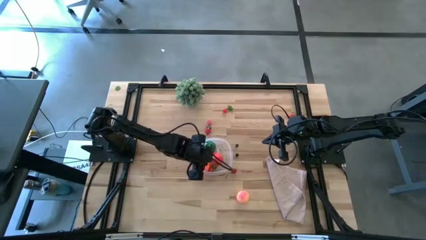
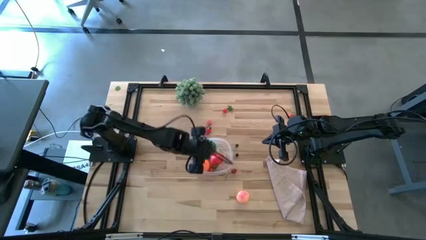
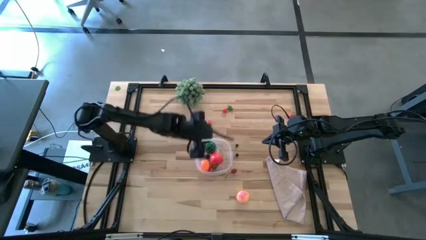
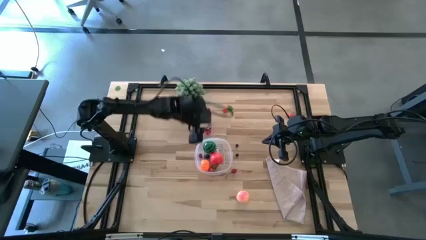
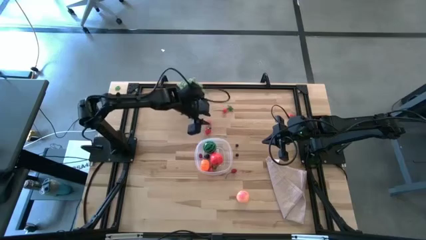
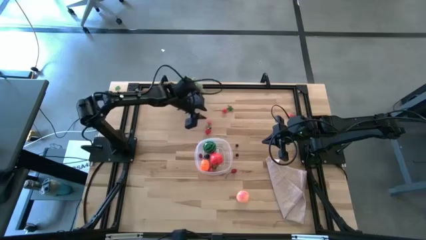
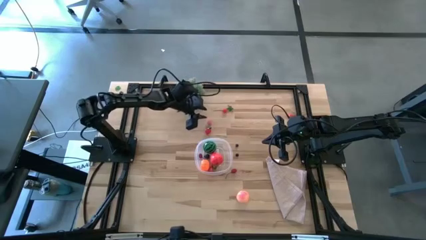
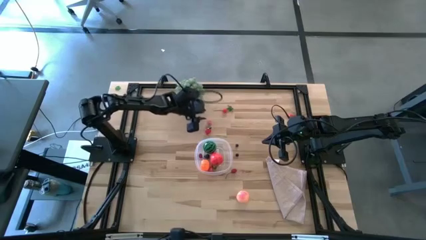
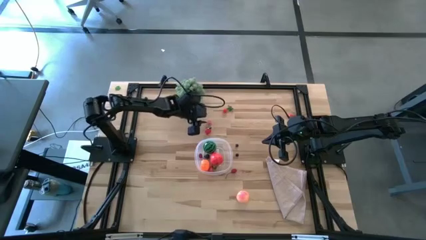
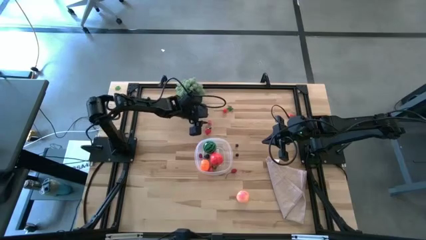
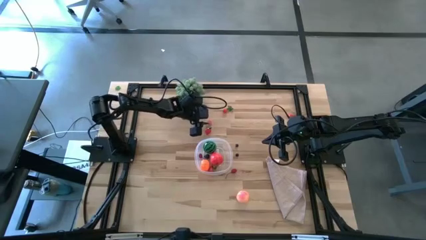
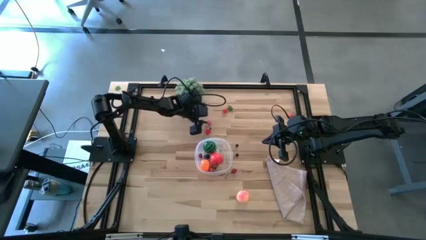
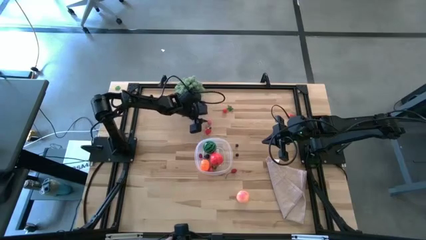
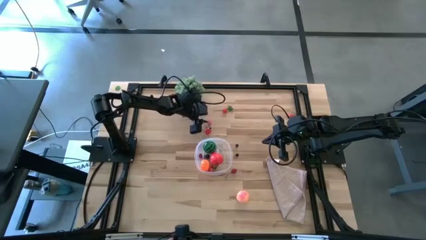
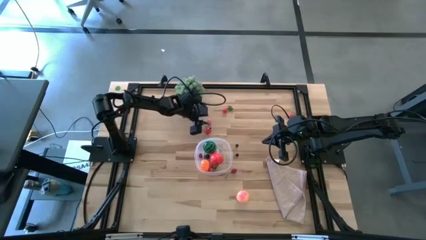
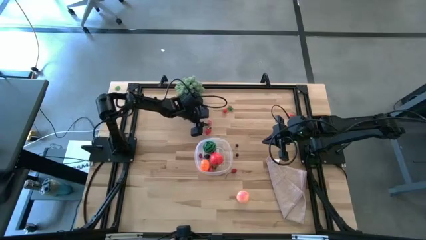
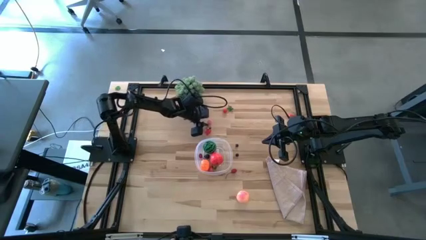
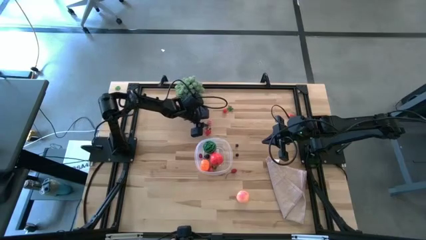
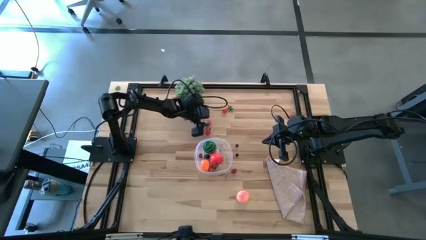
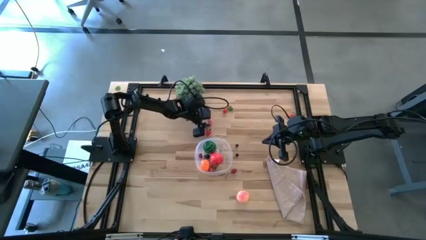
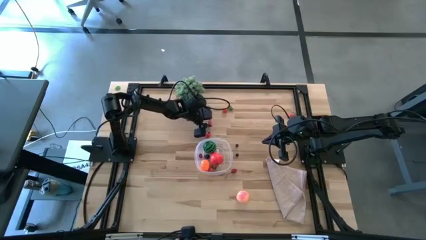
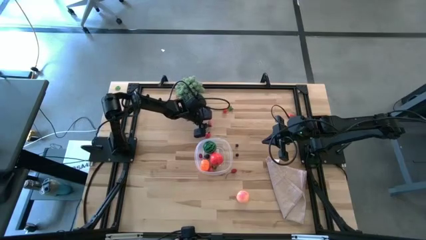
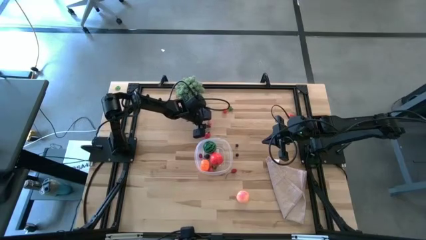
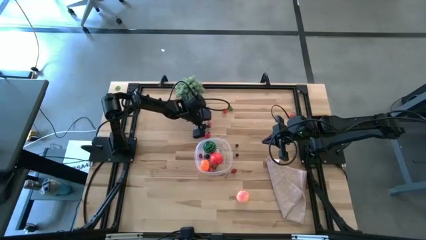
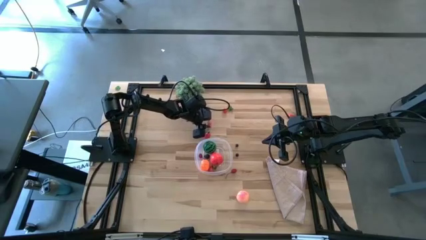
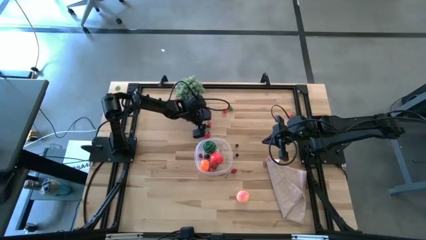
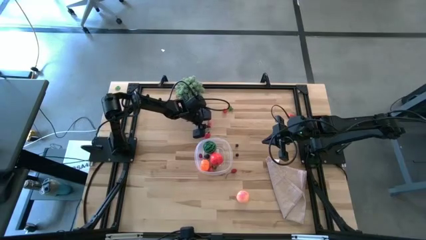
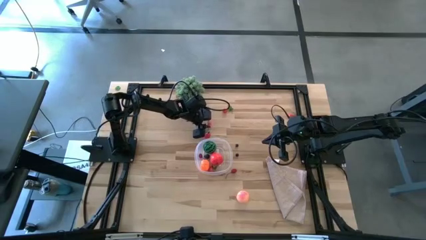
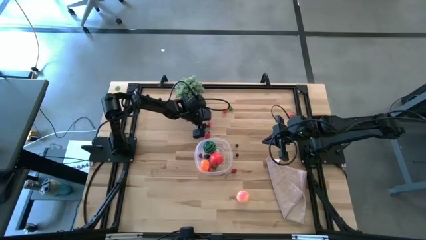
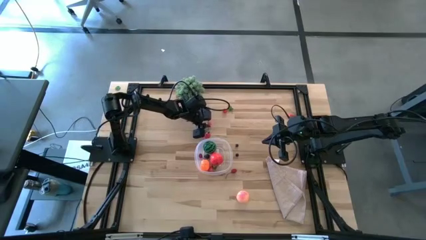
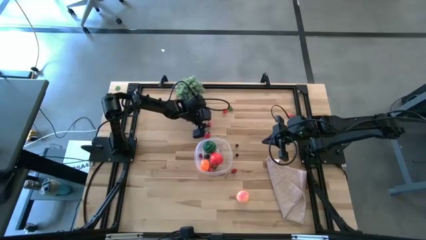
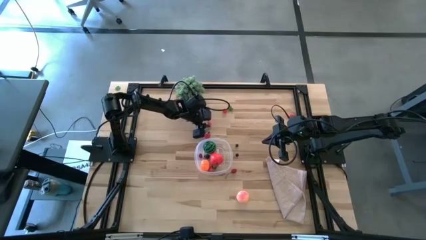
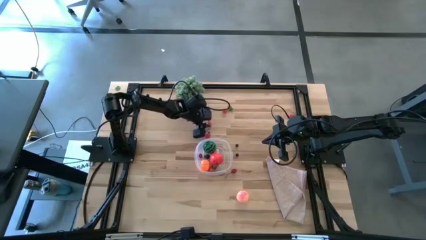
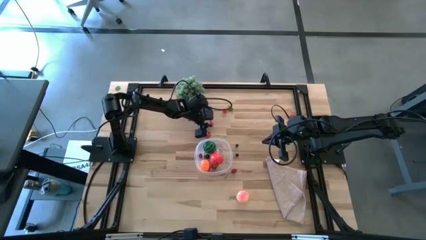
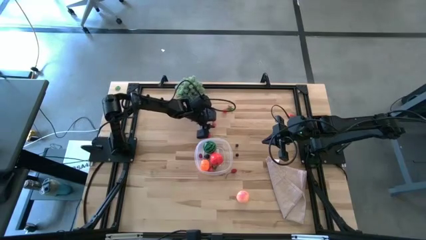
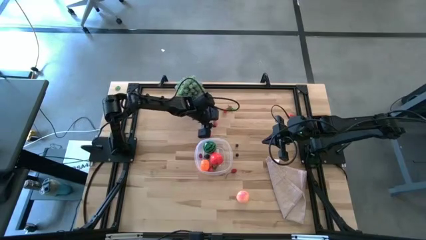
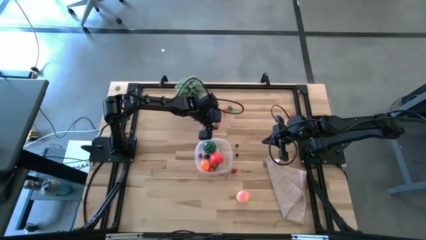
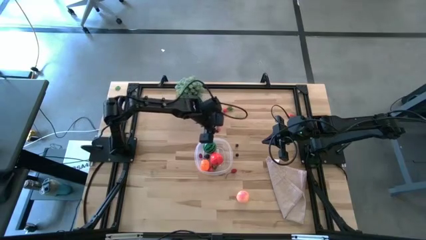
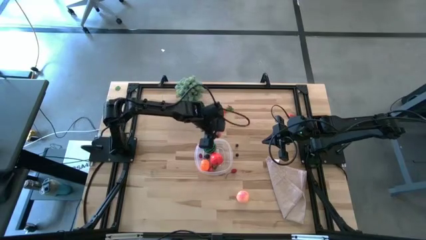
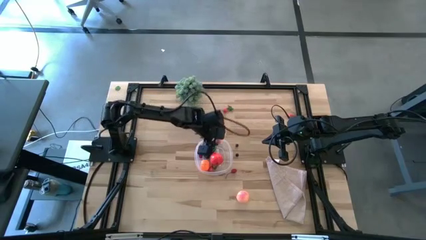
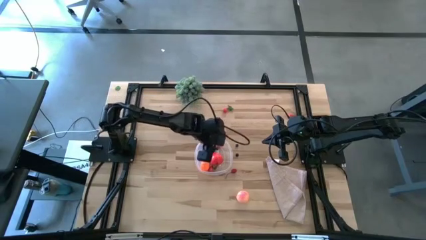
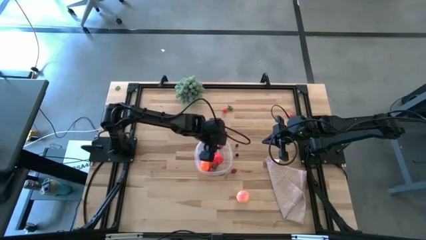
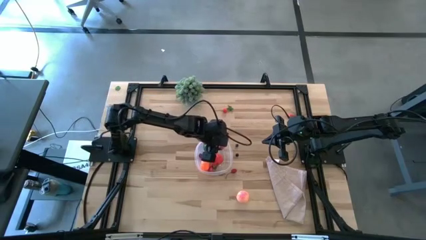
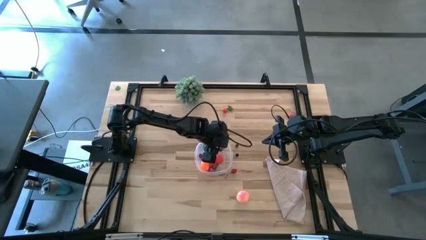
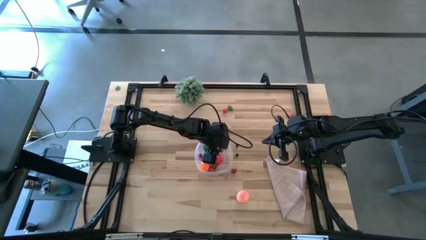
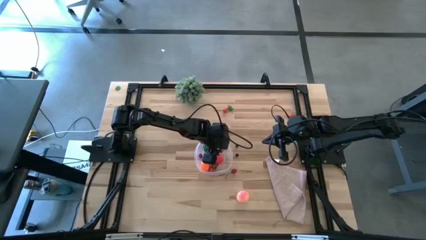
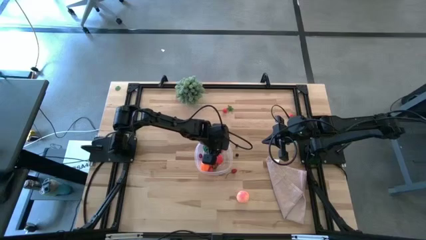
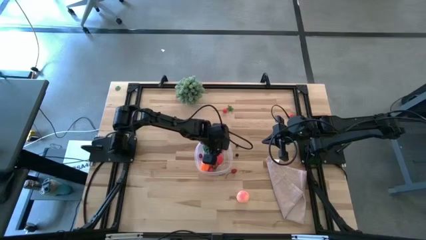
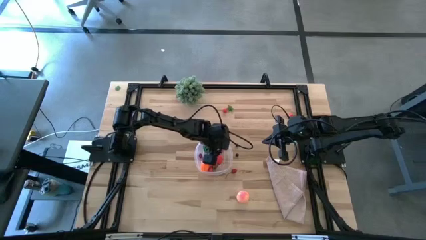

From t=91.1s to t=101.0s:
Task: Pick and placing Produce into tupperware
Put the apricot into the transparent container

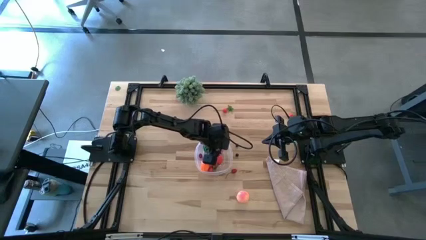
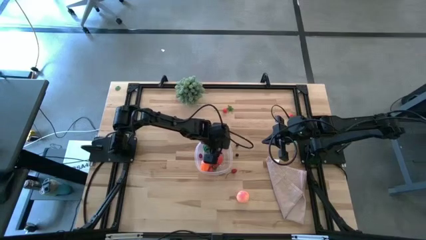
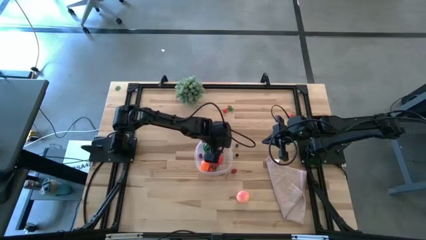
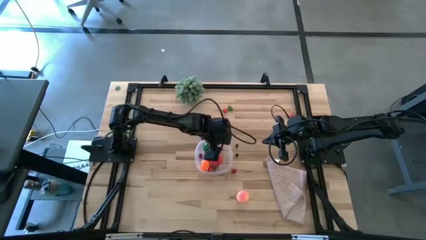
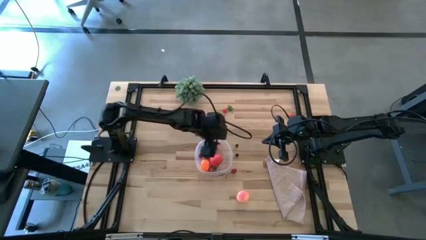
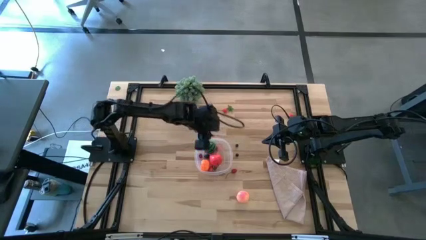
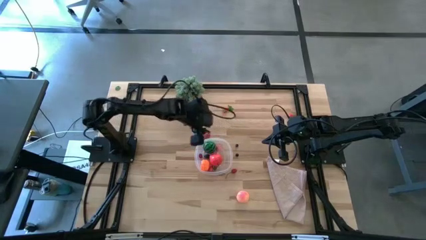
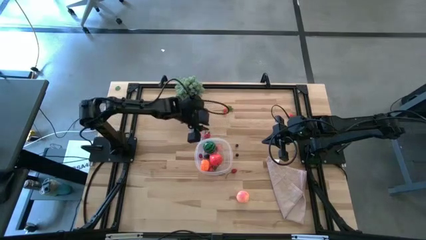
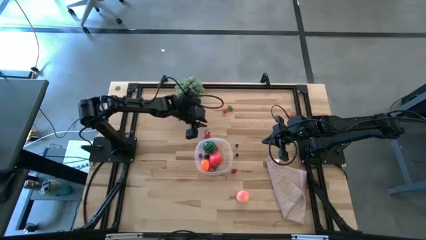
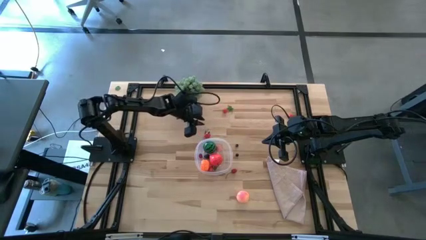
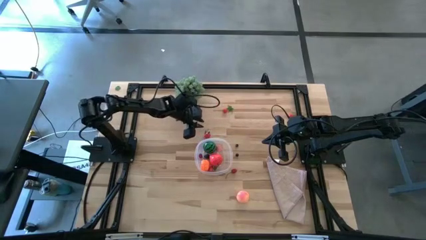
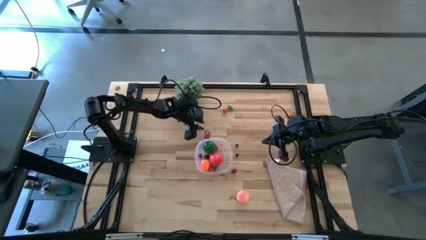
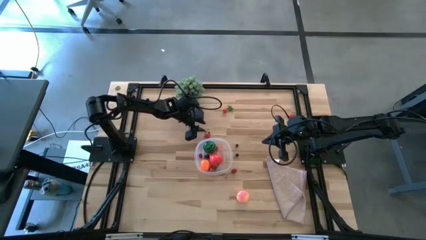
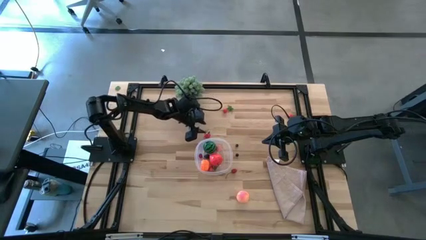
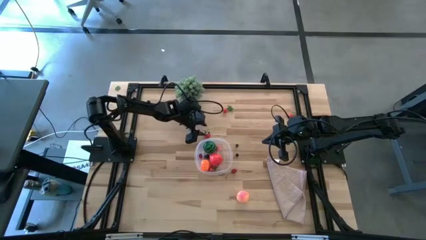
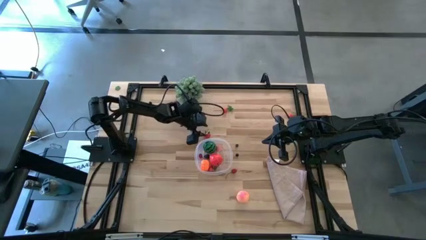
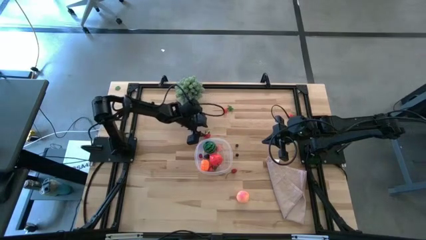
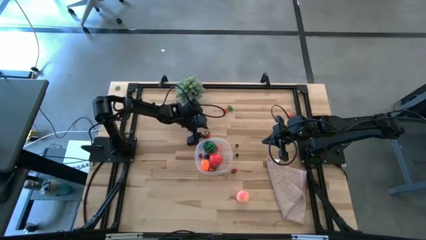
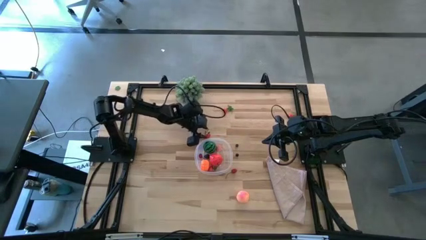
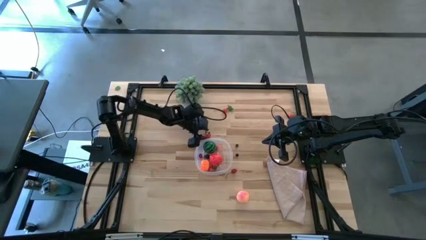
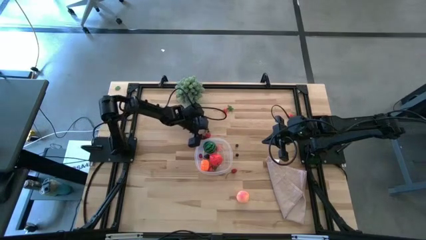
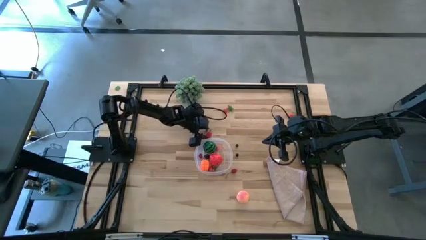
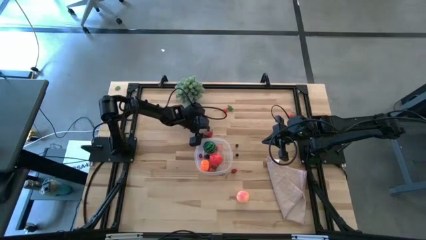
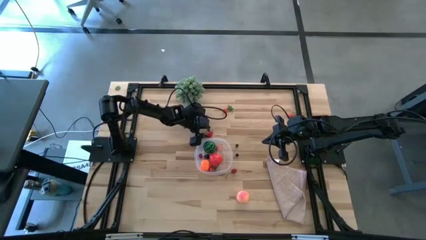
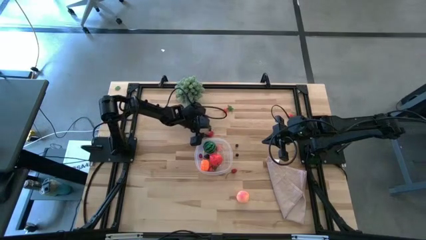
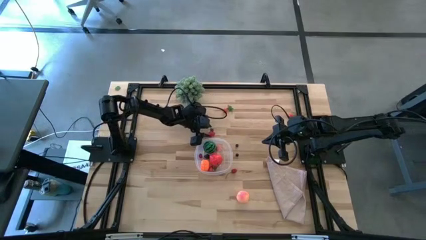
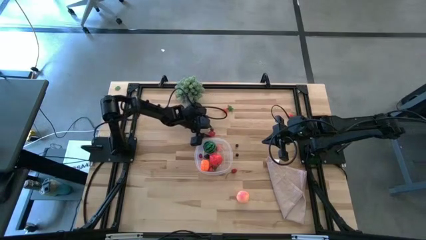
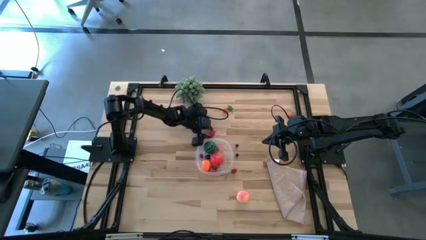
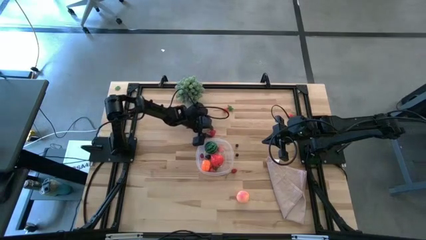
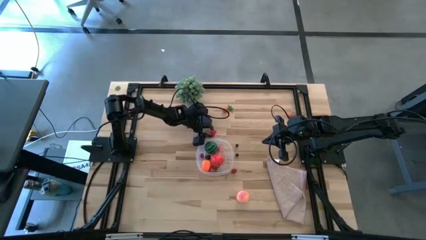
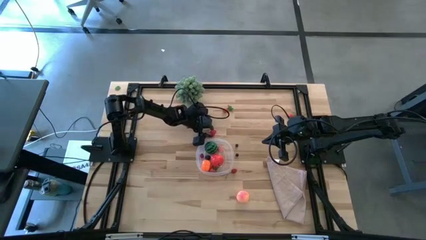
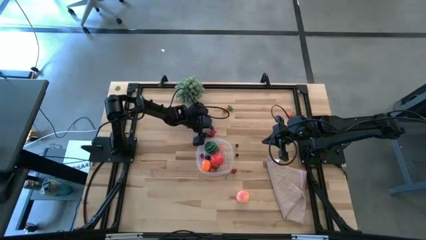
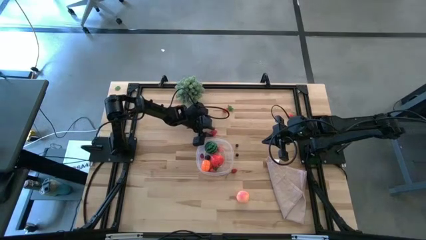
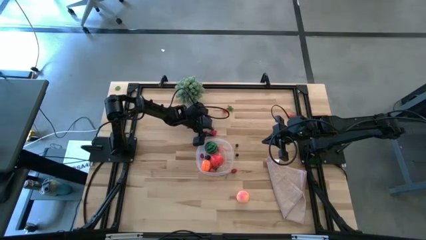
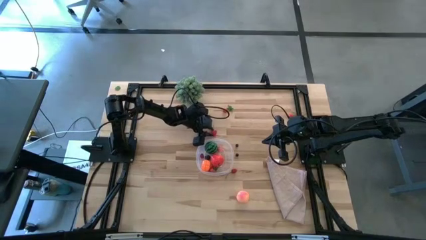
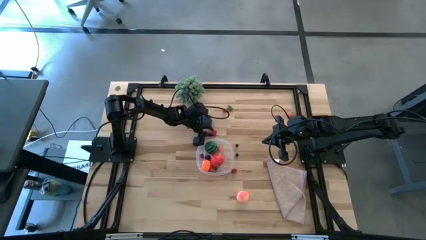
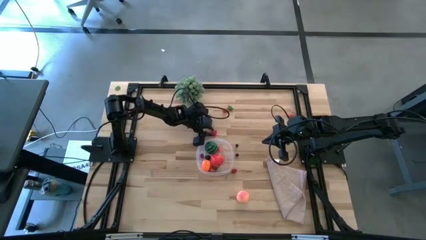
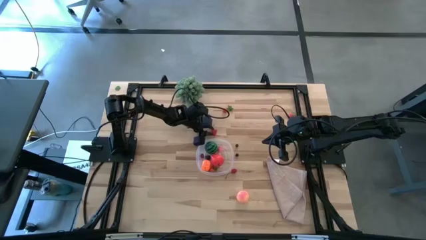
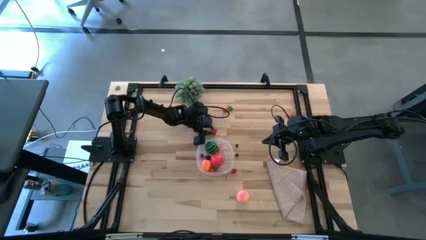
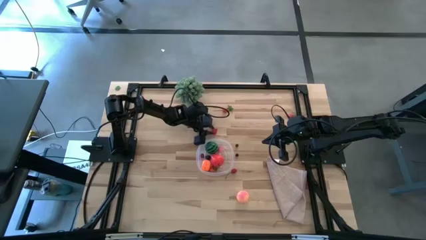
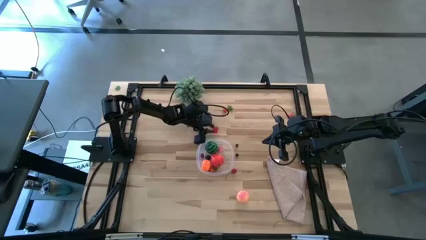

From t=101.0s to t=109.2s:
Put the strawberry into the transparent container
